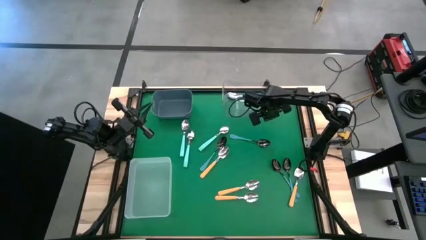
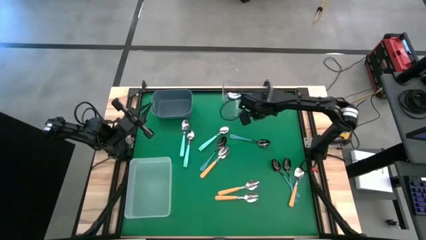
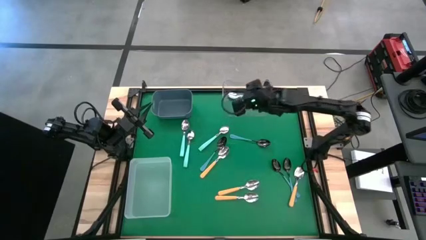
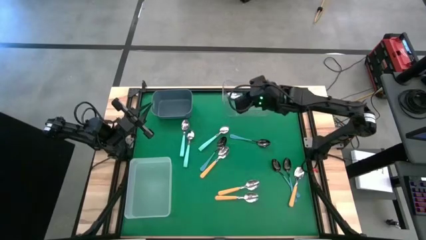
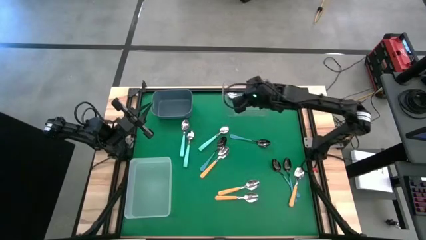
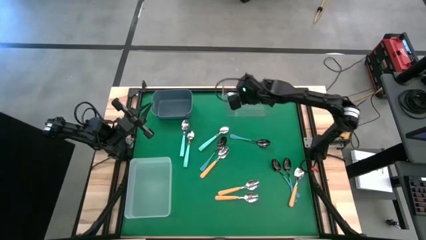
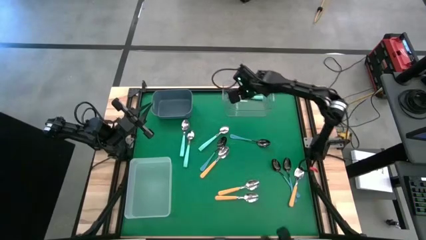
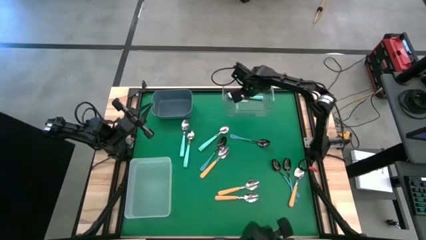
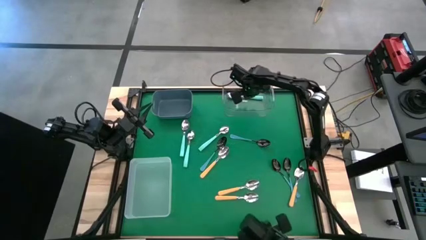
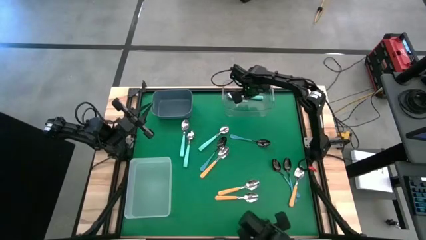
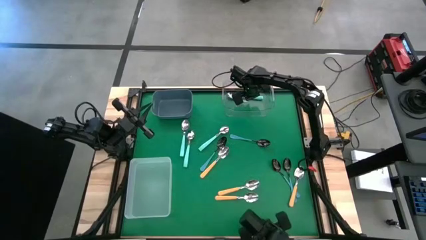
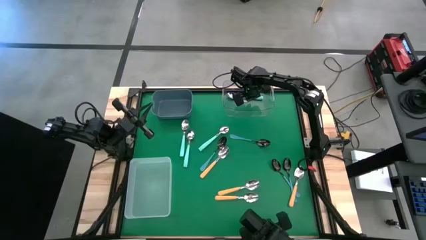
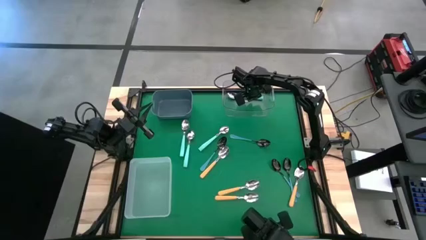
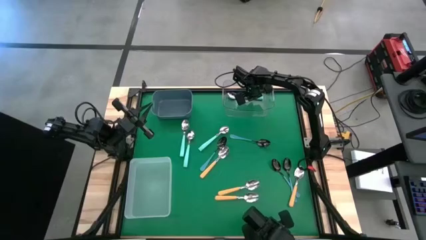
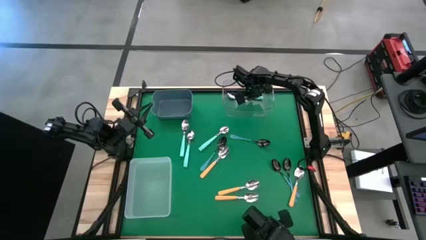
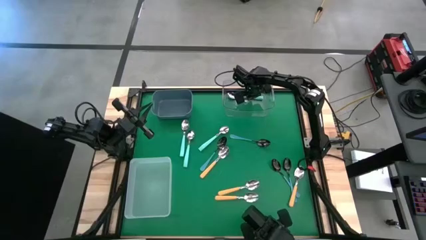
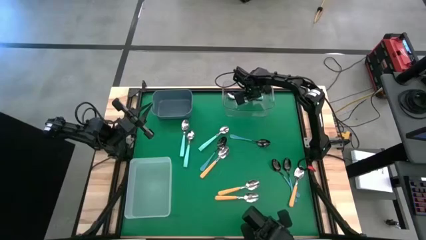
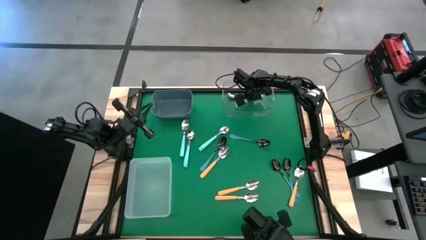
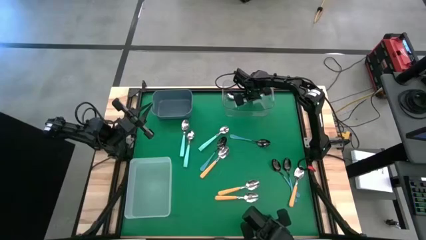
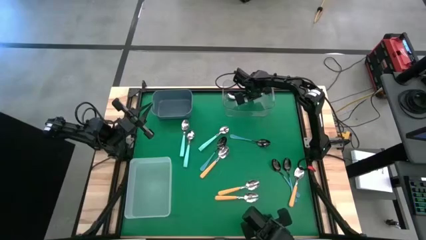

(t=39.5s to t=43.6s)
Task: Sort silverware by color (type)
Adjust the light blue spoon in the transparent bin

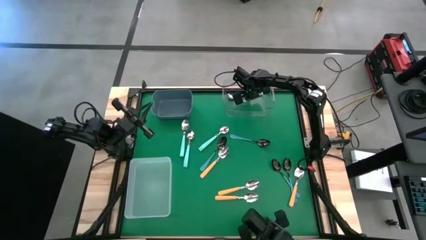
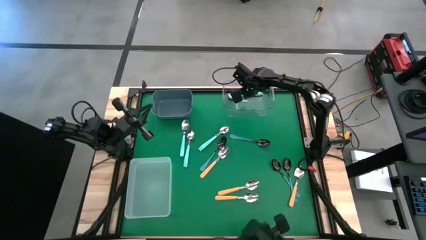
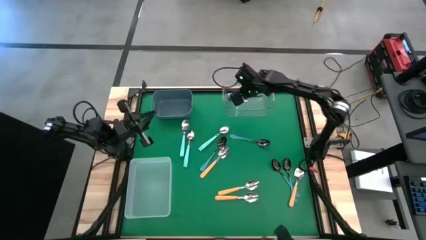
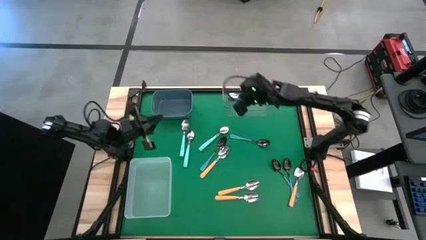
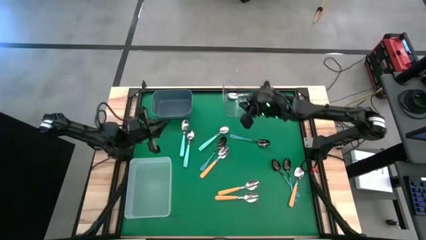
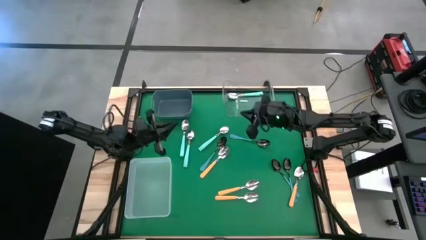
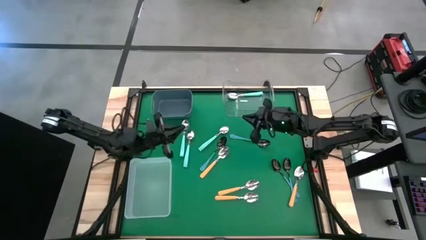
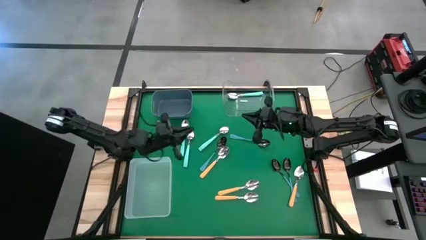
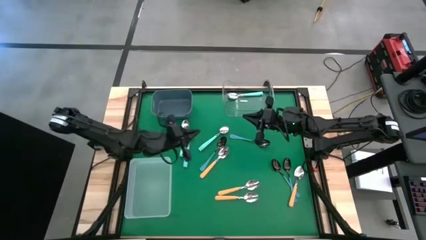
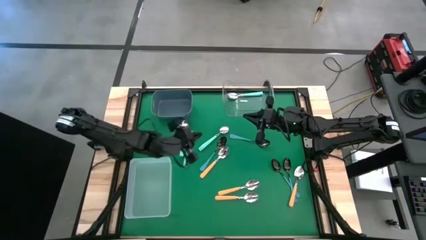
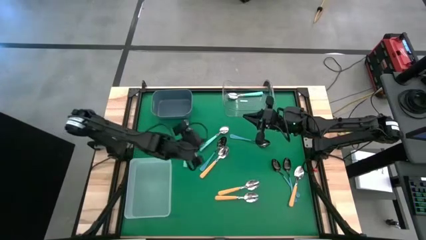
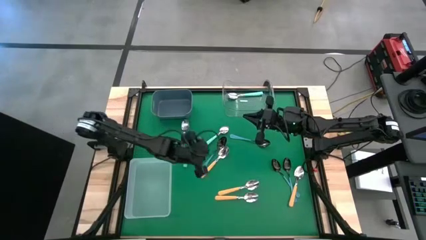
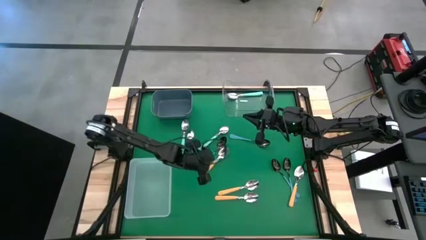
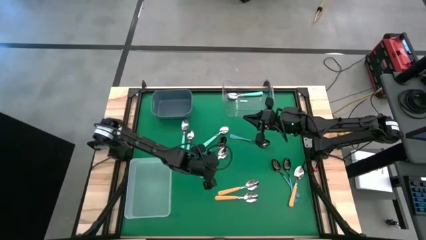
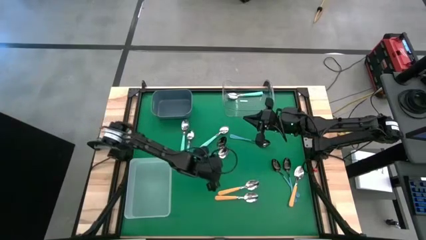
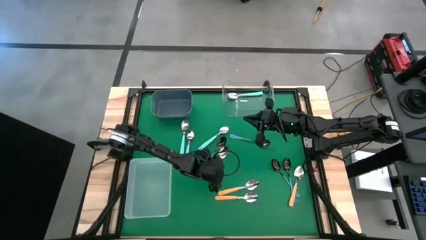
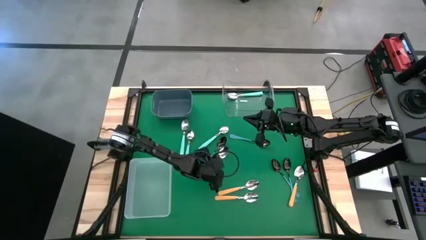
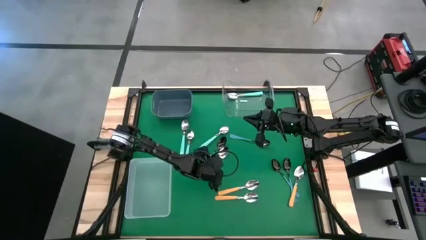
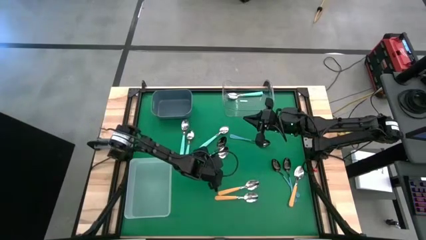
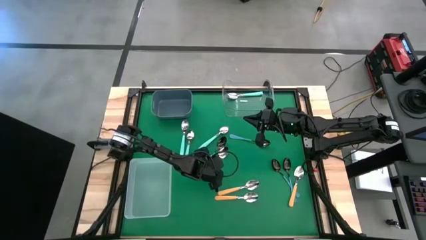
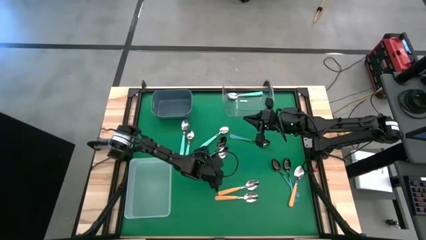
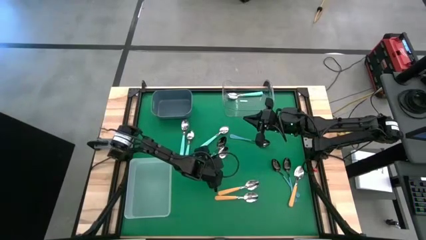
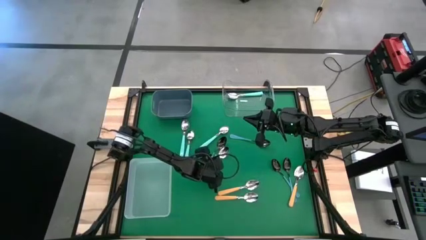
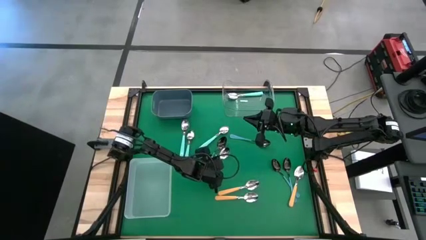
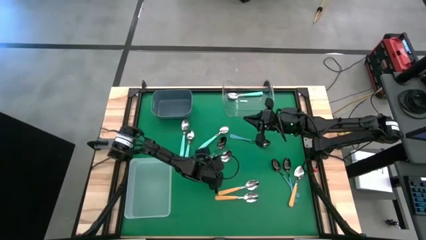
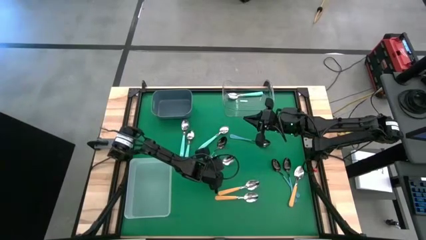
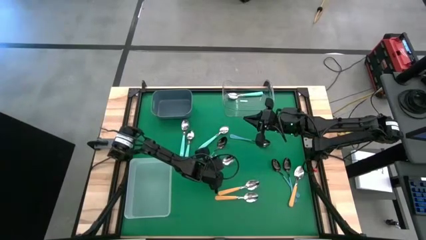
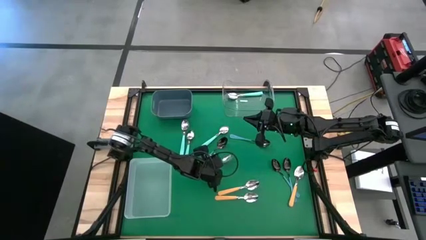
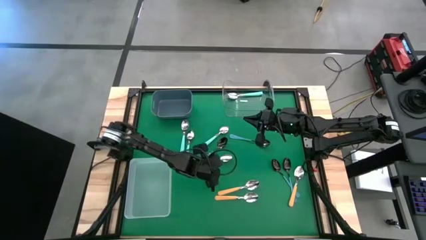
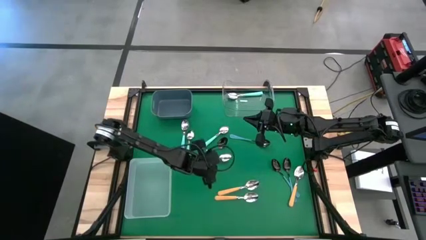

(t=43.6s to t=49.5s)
Put the yellow spoon into the gray bin

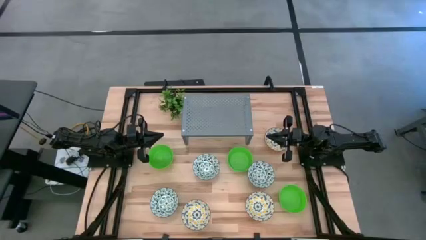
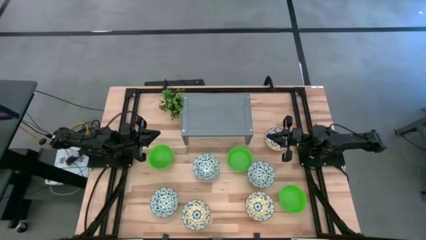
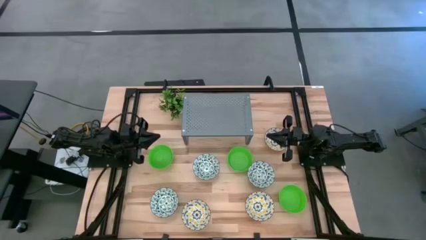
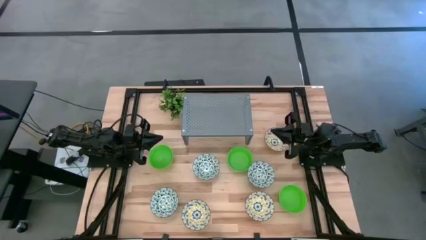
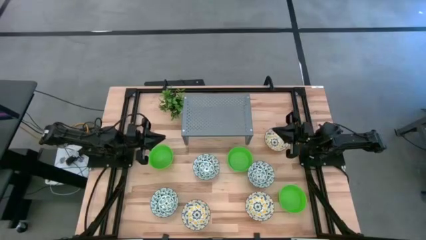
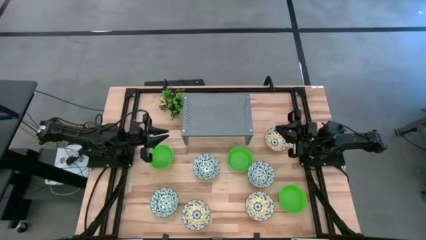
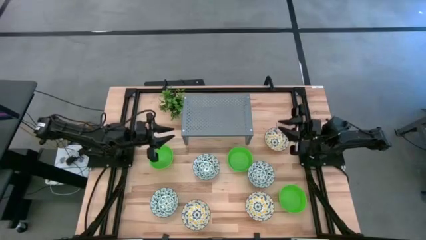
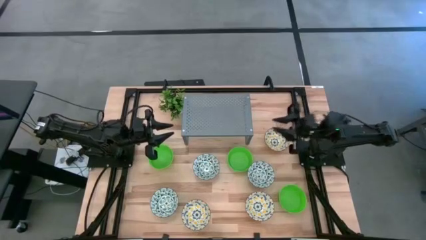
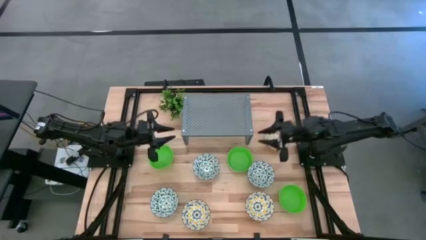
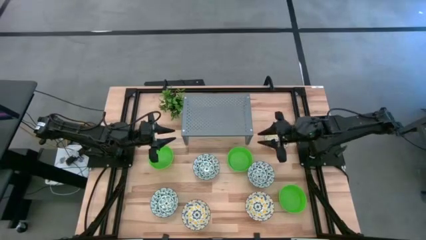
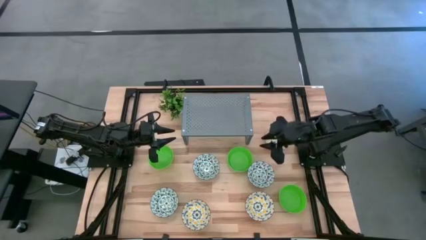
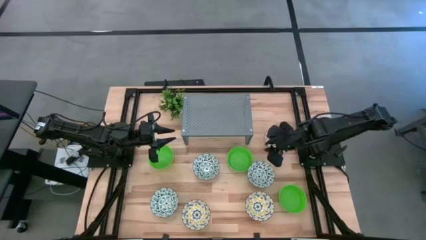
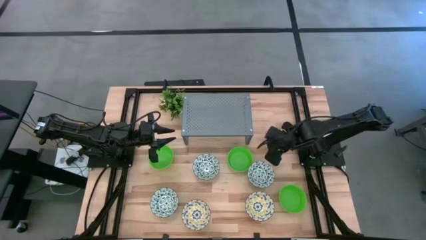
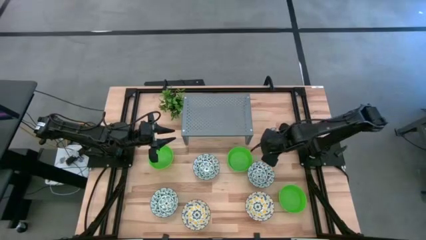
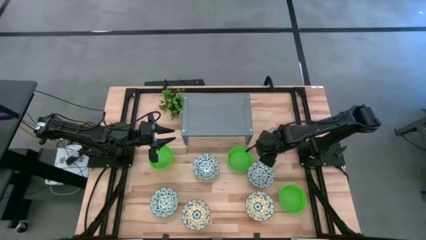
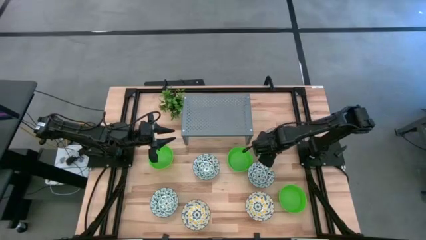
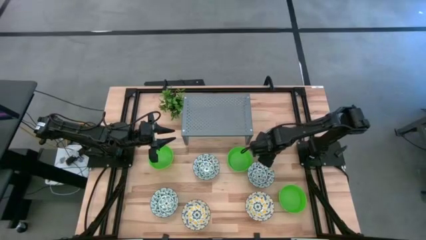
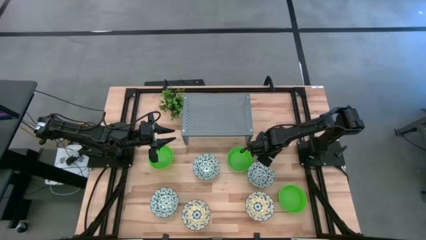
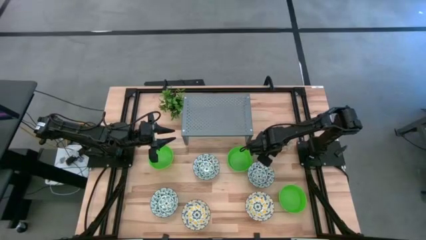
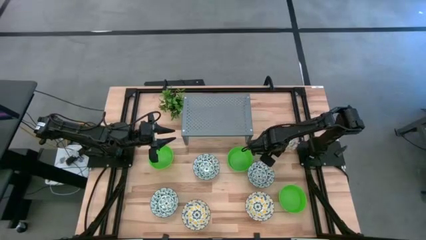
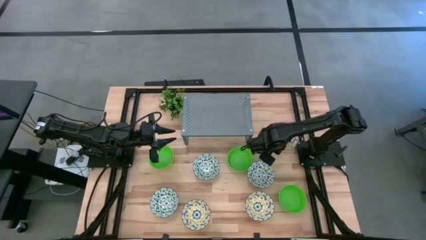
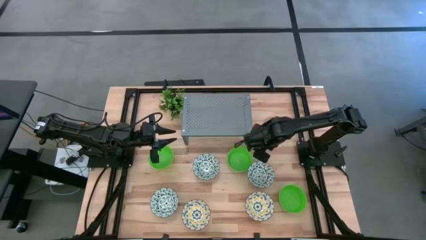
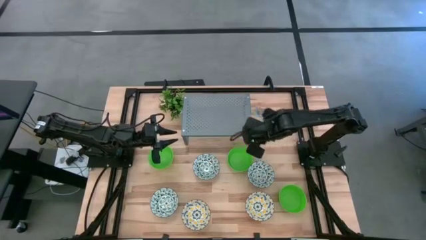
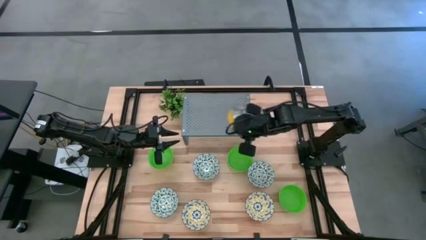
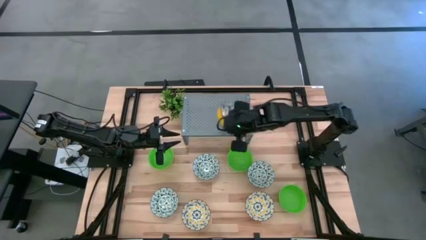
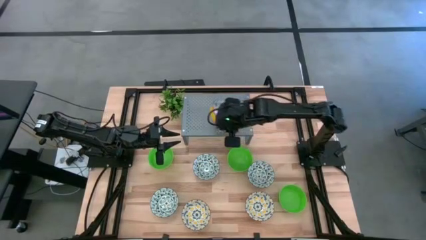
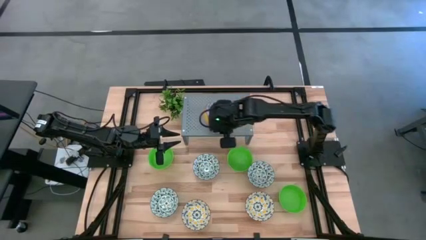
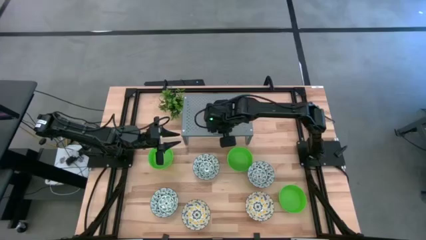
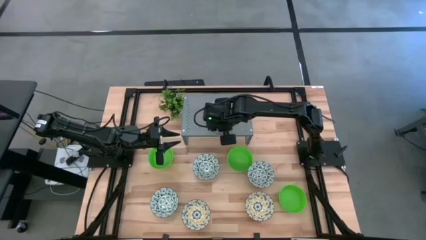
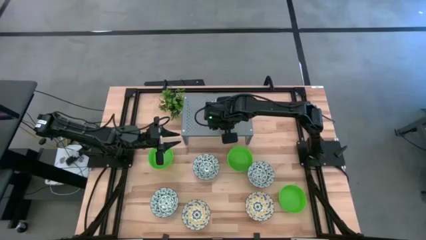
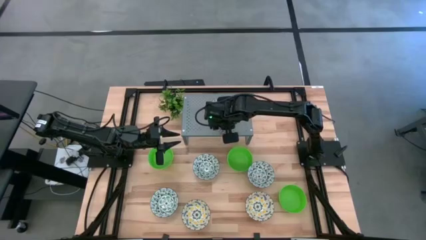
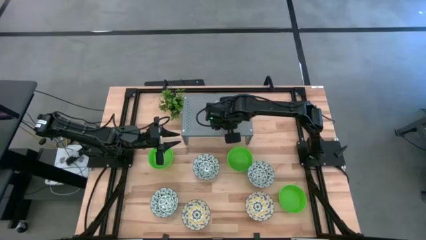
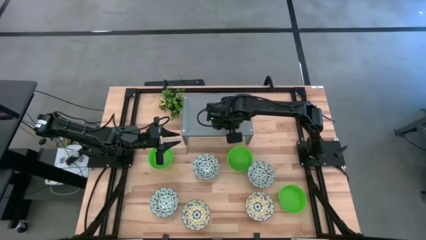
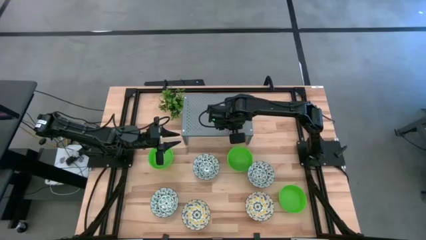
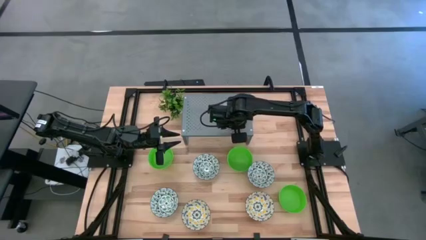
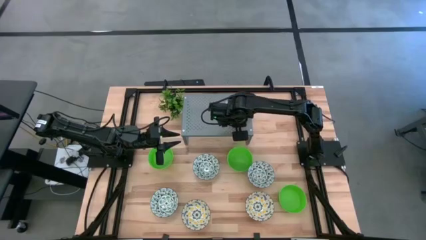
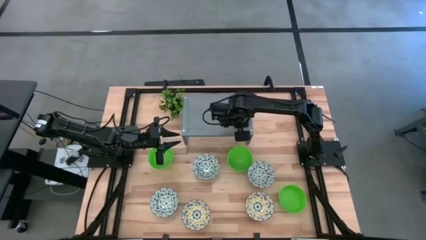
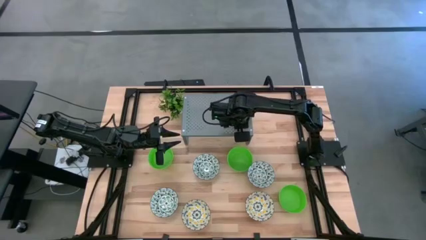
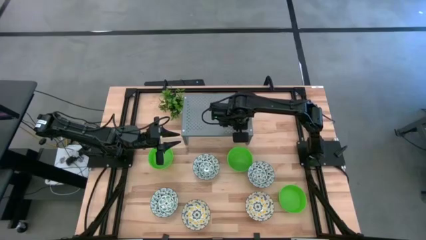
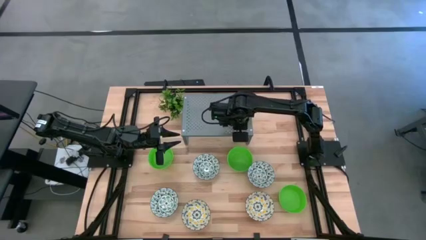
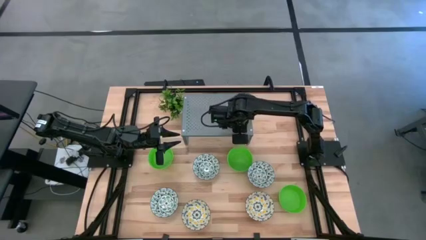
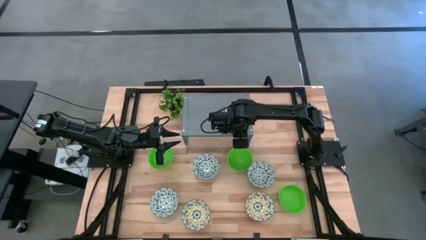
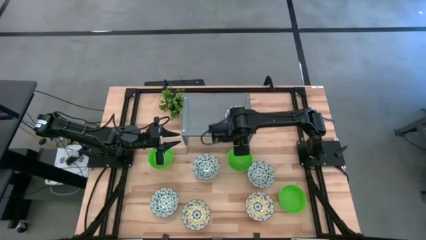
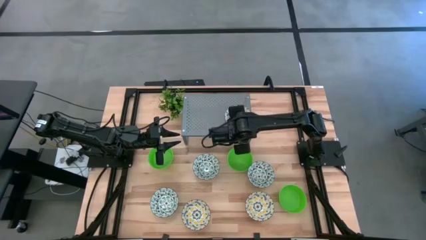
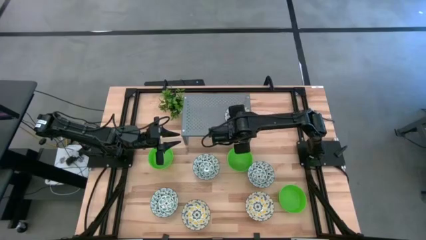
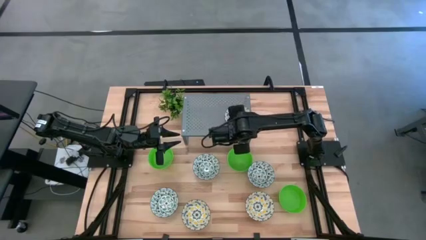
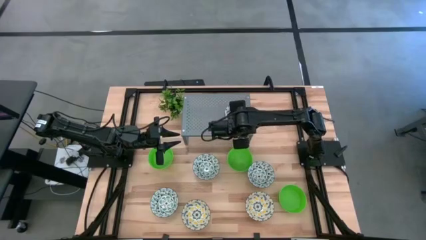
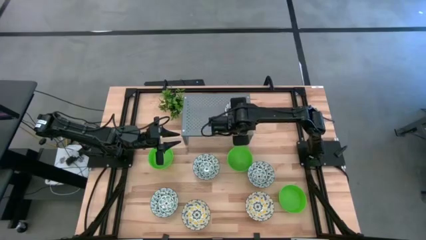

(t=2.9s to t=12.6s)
Task: Pick & Place Mini bowls
Put the top right yellow and white patterned bowl on the shelf
